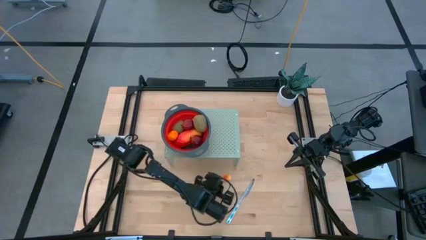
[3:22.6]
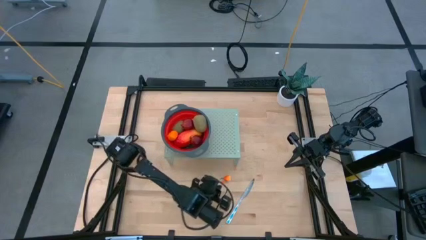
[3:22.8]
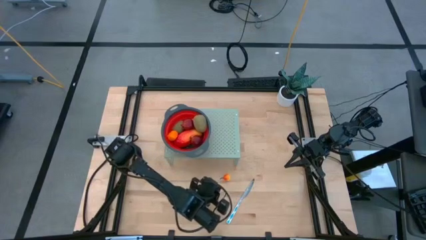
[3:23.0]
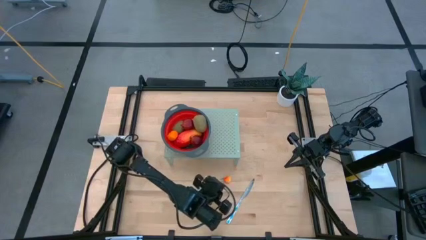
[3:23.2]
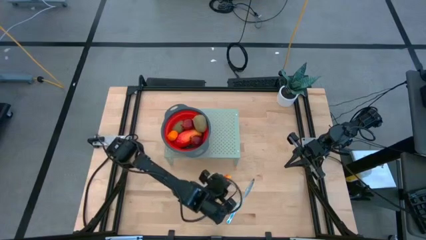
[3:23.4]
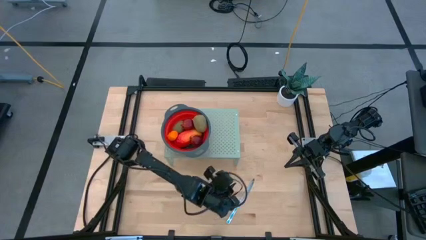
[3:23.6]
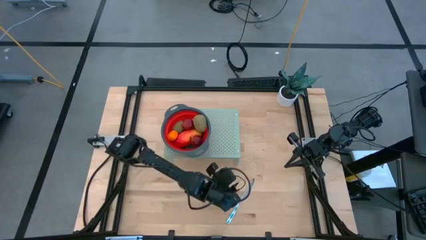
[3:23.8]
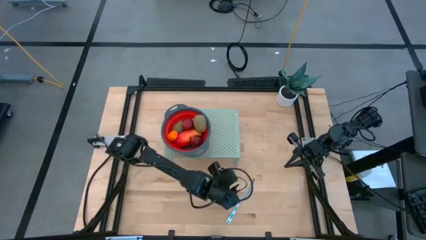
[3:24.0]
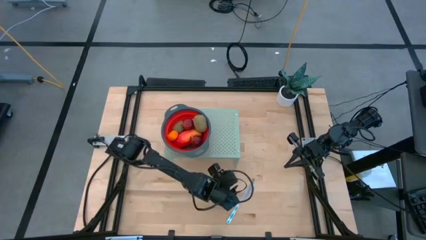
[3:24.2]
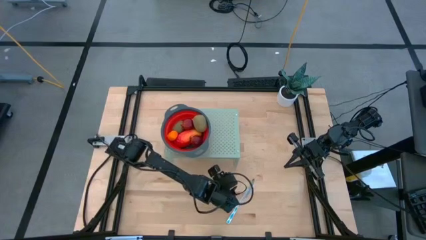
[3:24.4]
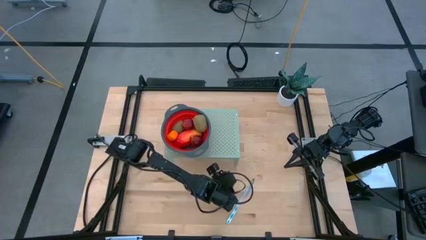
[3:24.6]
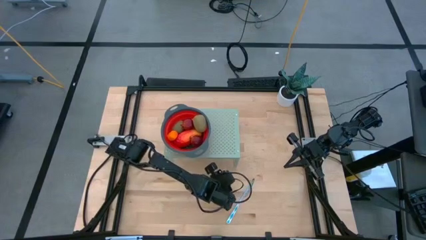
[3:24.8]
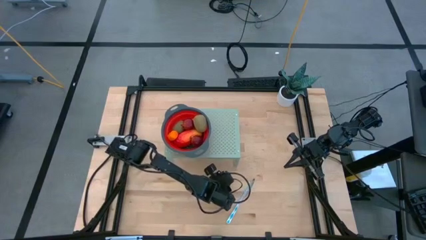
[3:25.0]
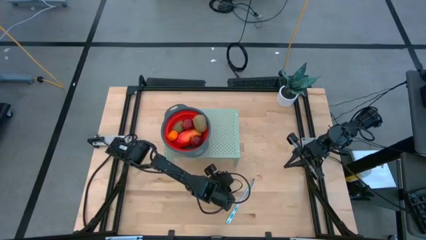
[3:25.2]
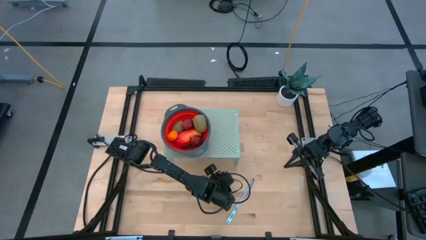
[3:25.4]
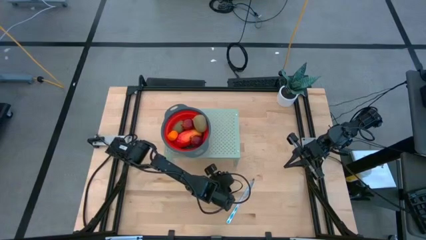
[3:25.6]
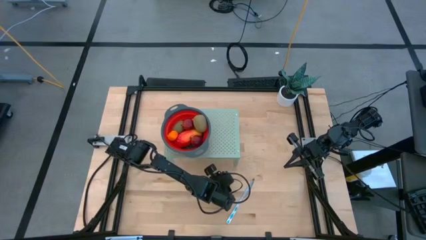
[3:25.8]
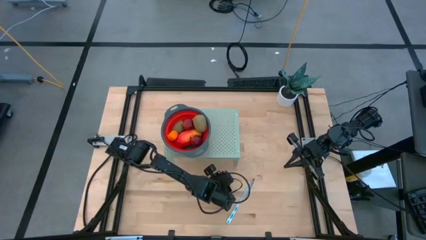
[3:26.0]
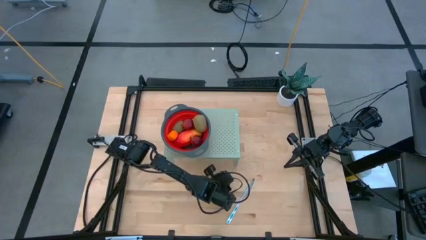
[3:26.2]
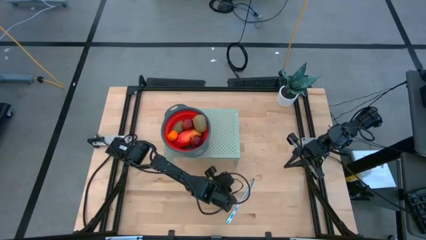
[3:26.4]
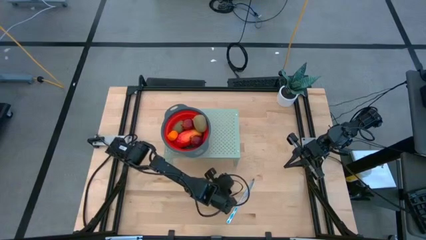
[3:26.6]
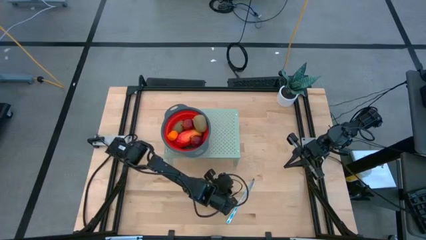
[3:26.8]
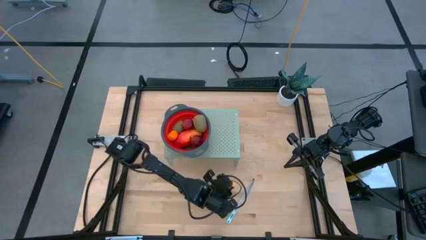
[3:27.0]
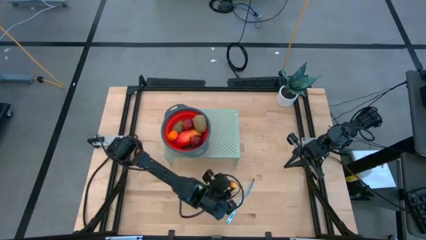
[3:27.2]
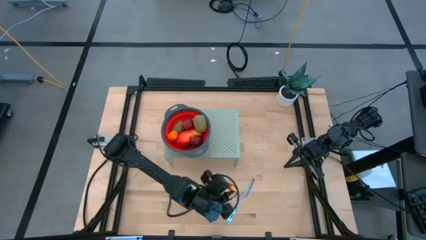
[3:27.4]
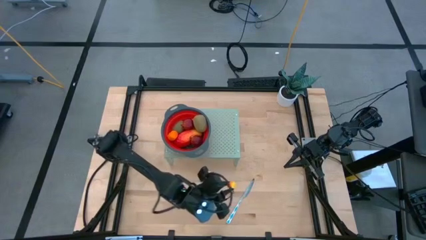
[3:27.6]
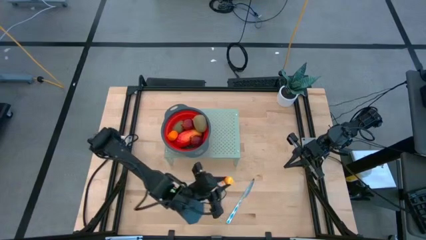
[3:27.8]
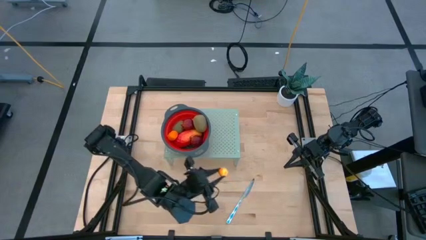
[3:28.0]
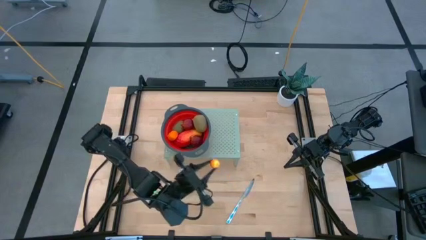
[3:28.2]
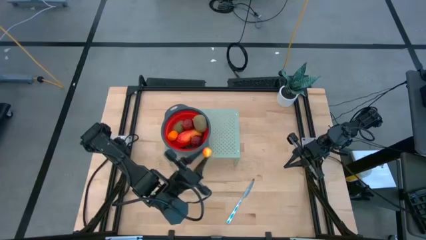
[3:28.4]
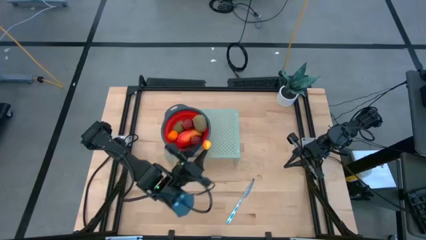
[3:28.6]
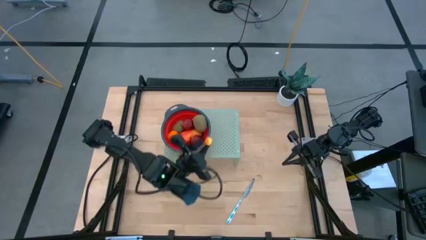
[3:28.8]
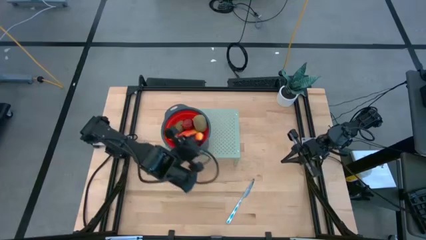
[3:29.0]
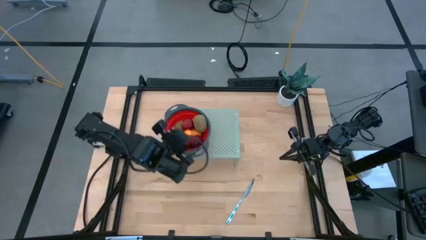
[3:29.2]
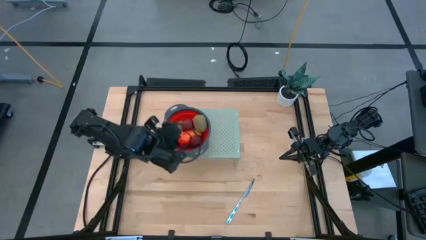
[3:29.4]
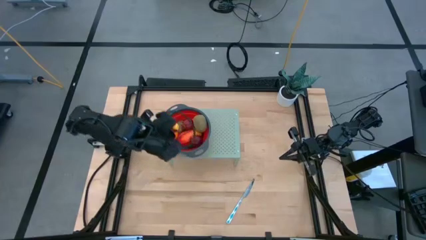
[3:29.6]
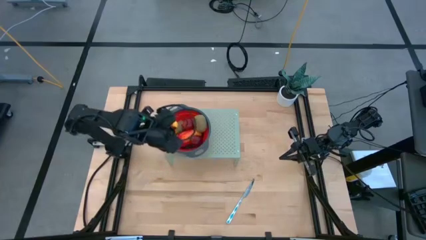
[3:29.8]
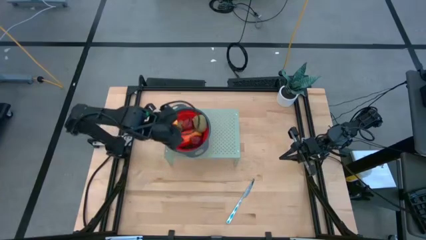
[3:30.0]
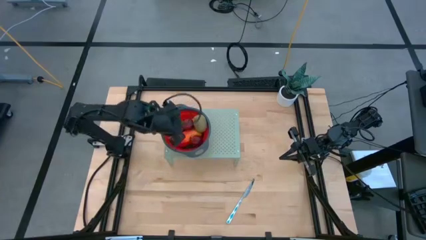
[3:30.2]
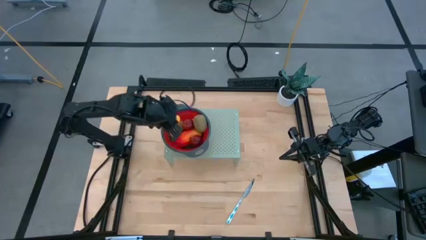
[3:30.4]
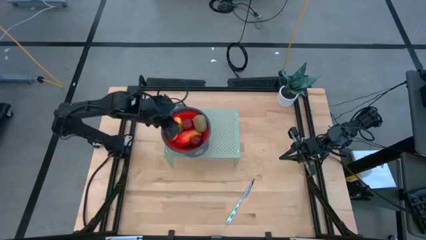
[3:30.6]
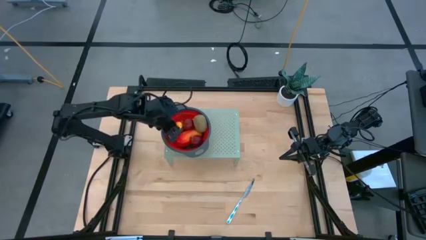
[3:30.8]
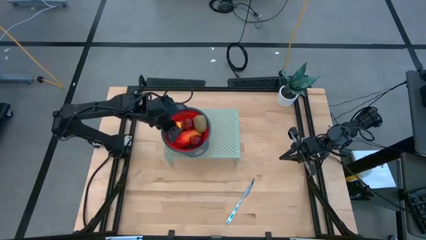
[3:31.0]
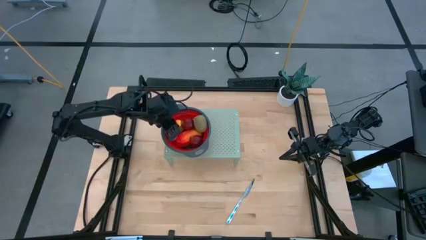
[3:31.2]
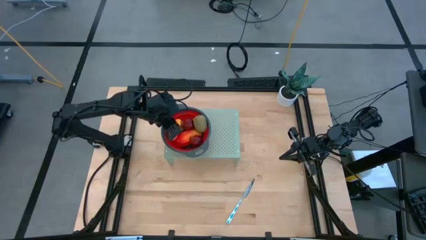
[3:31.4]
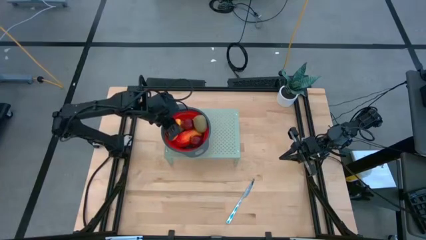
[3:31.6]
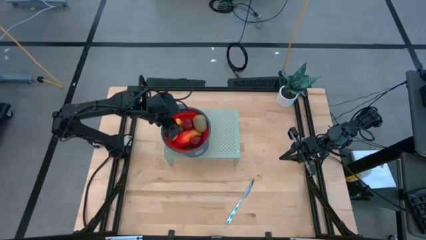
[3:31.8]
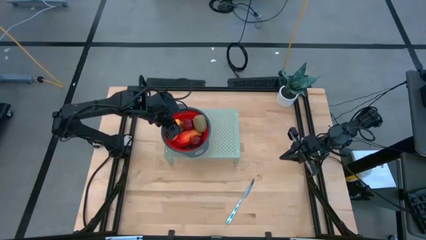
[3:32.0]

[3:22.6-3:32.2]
Task: Pick & Place Fruit
Put the orange pear into the red strainer bowl on the shelf

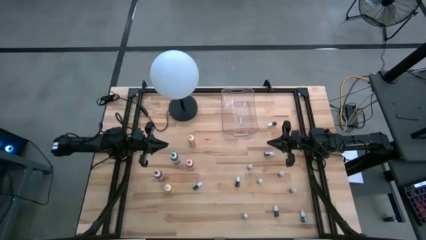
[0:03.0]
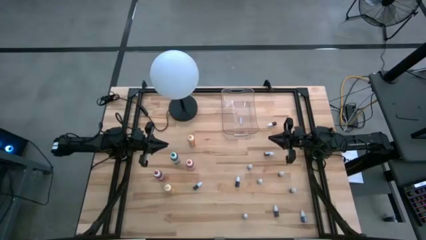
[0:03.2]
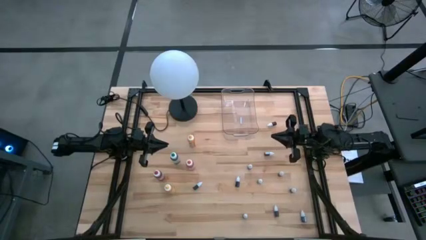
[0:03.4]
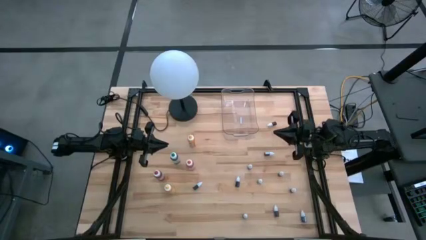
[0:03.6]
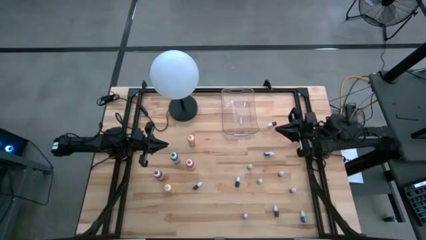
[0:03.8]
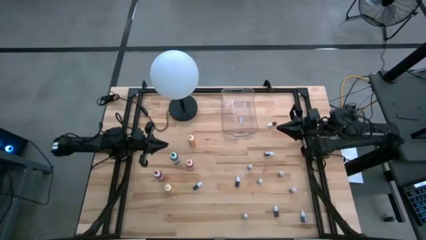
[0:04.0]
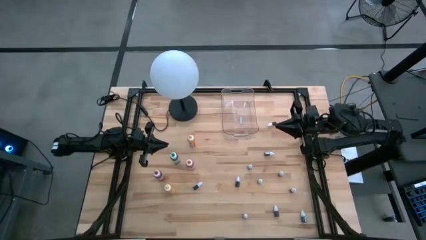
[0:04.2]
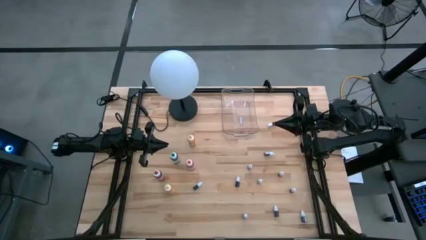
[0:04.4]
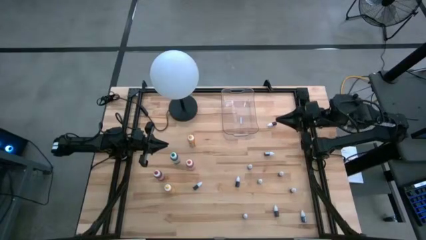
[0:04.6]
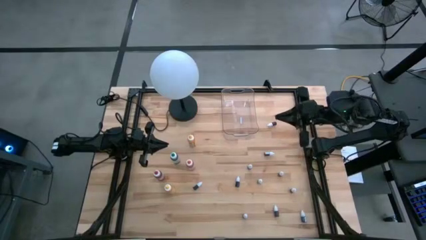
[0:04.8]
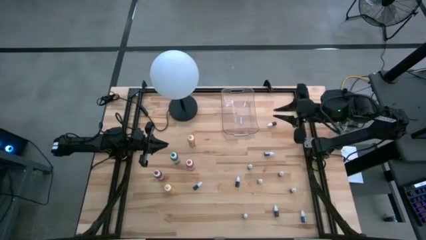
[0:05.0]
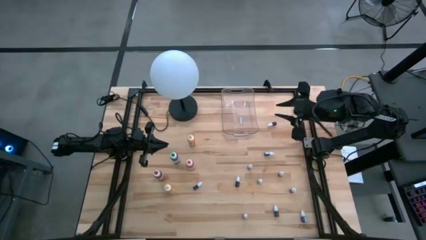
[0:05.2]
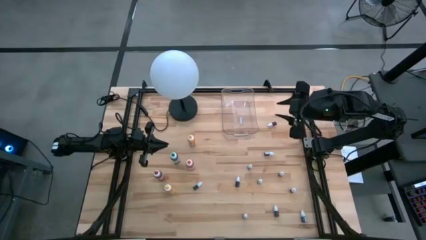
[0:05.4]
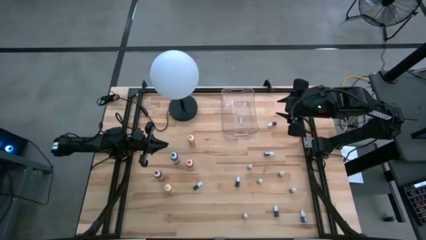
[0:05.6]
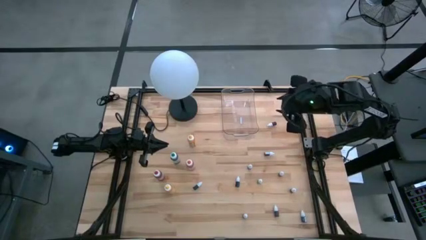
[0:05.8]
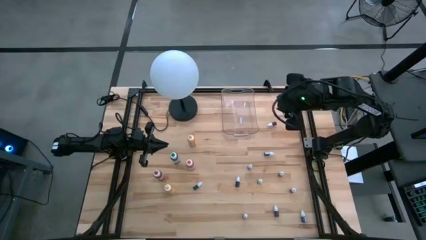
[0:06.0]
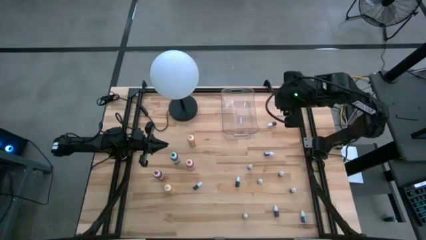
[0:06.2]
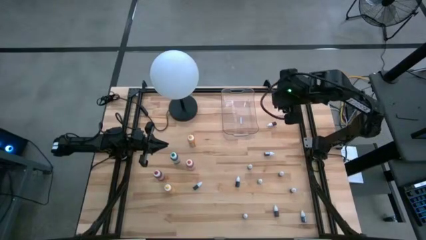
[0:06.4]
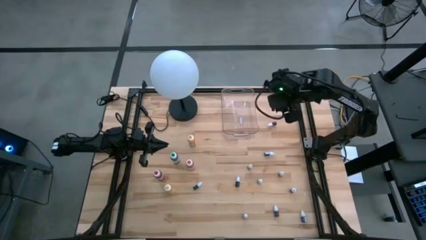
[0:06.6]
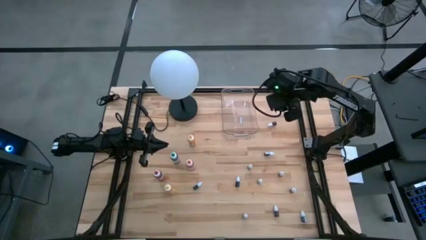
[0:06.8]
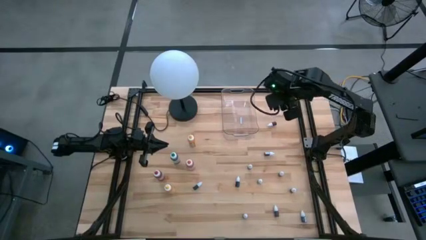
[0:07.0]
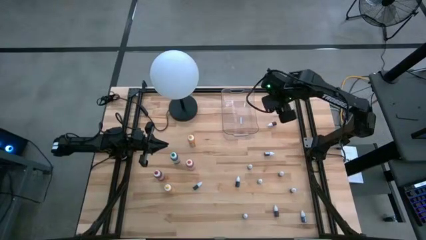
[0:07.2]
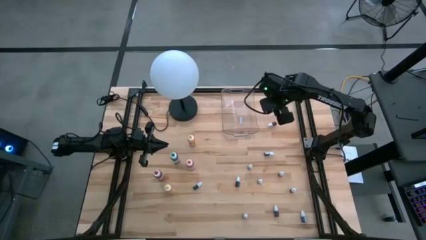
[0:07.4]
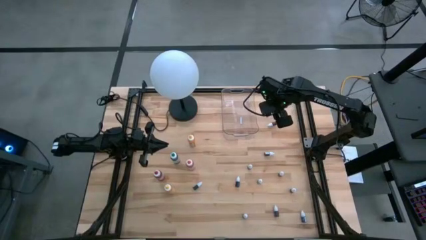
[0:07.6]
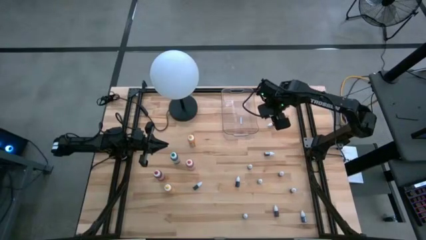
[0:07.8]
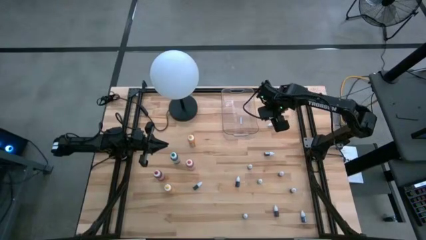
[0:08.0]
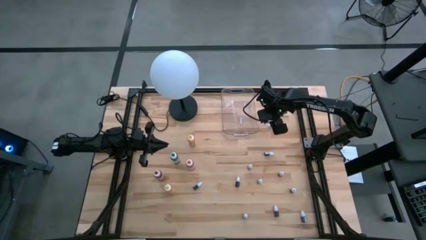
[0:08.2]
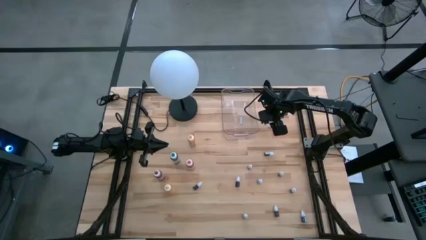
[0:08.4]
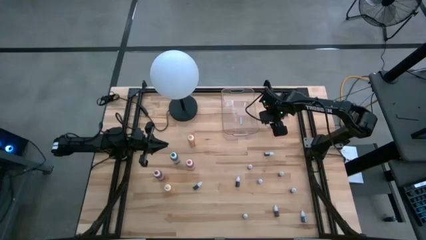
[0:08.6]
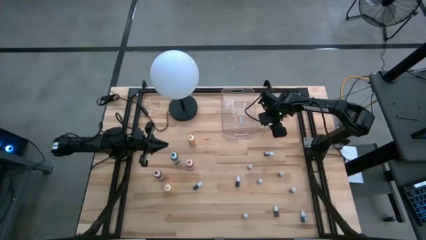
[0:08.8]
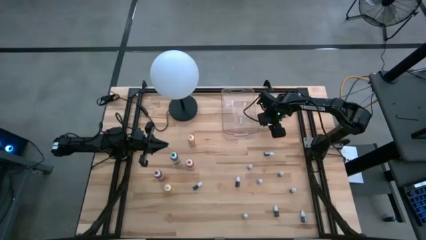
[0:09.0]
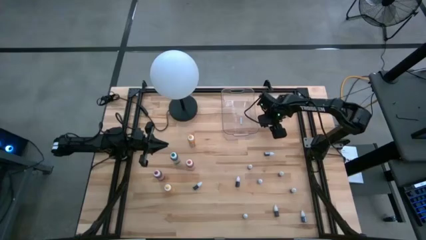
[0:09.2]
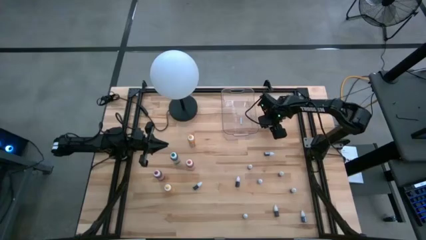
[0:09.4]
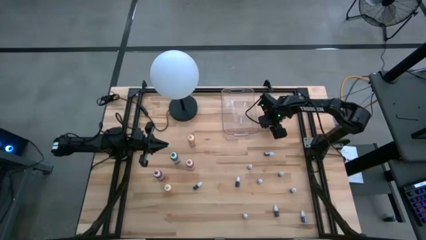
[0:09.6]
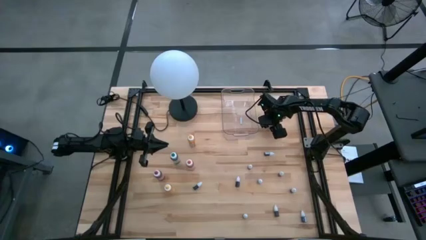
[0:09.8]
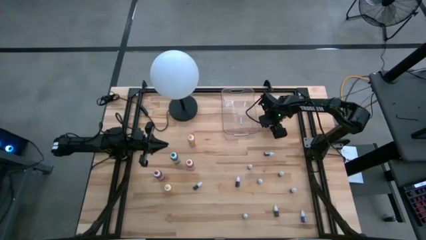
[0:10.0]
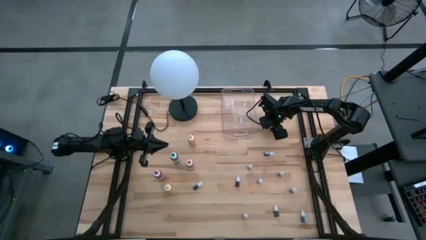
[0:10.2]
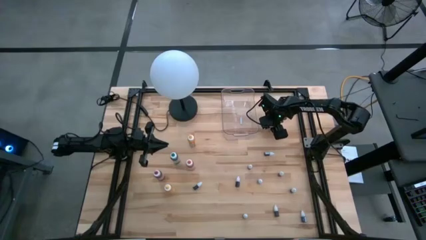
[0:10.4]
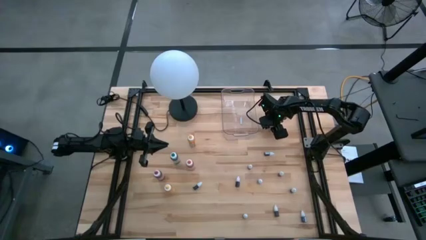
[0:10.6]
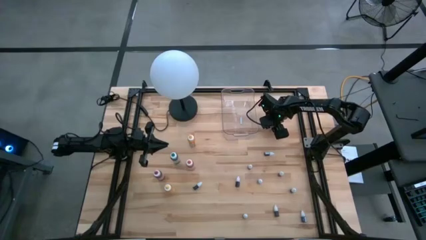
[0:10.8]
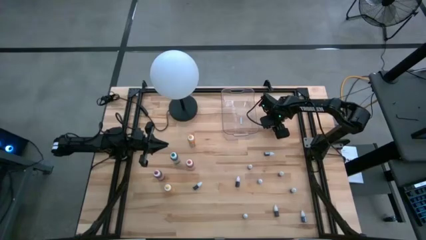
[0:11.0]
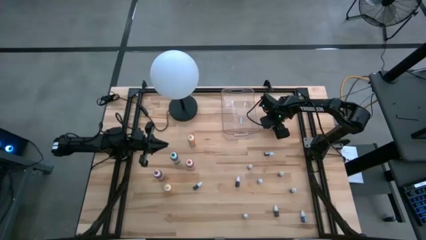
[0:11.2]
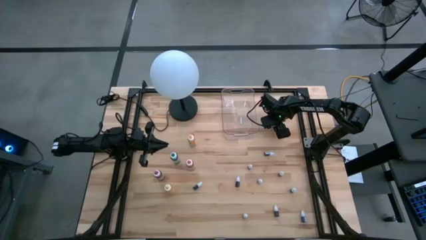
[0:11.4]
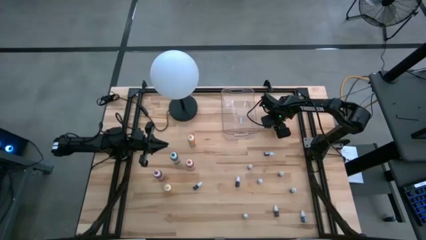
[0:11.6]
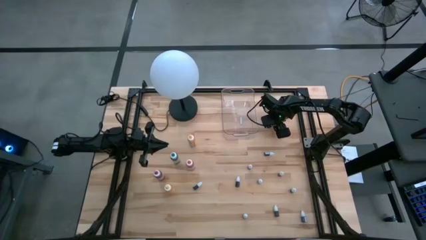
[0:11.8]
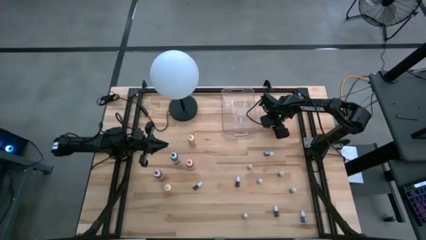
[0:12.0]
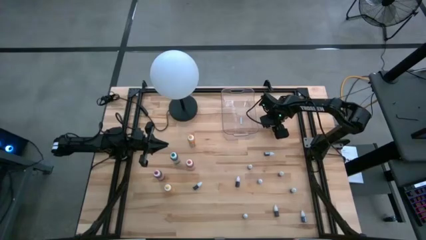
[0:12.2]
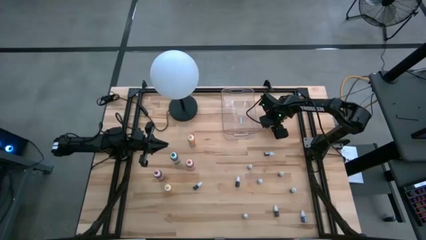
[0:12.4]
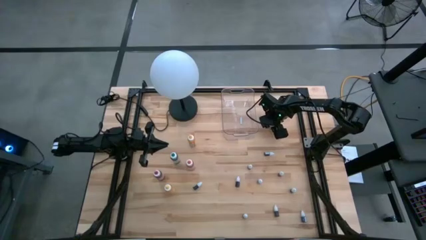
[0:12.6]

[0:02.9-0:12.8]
Task: Pick & Place food coloring
Put the small orange food coloring bottle into the transparent bin
